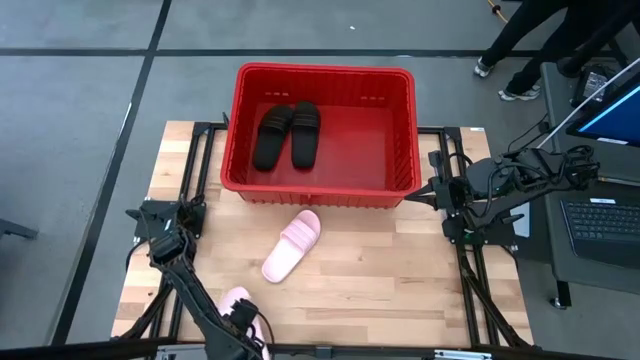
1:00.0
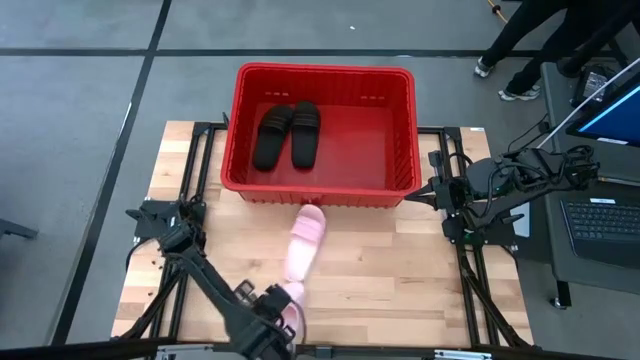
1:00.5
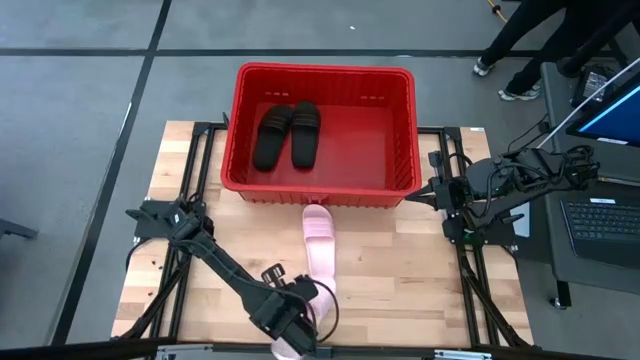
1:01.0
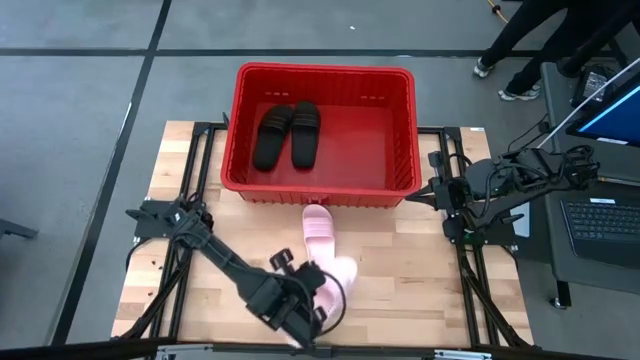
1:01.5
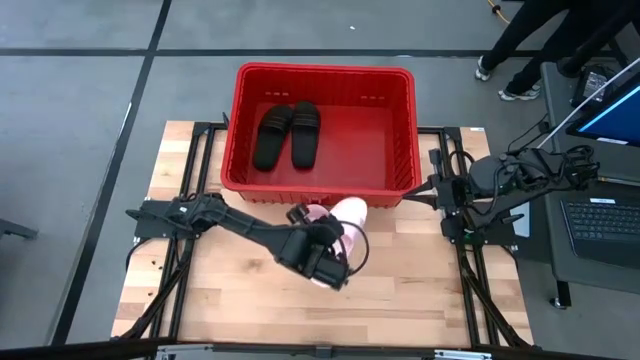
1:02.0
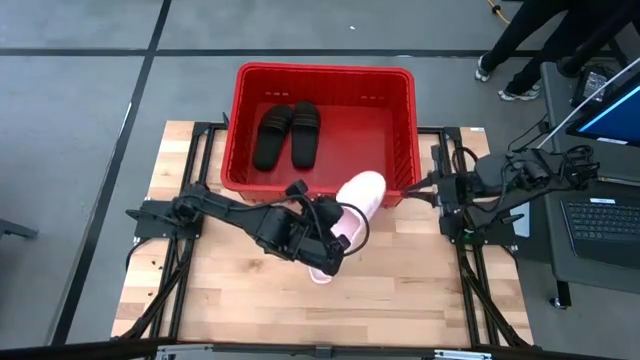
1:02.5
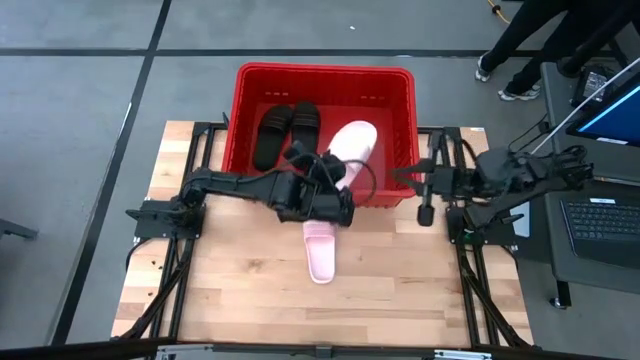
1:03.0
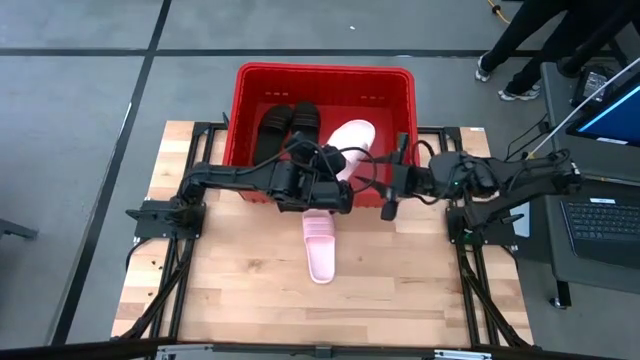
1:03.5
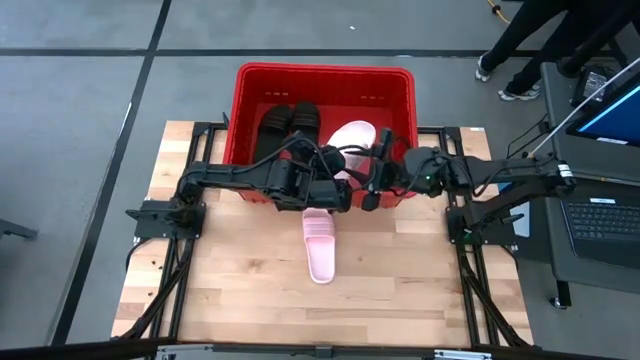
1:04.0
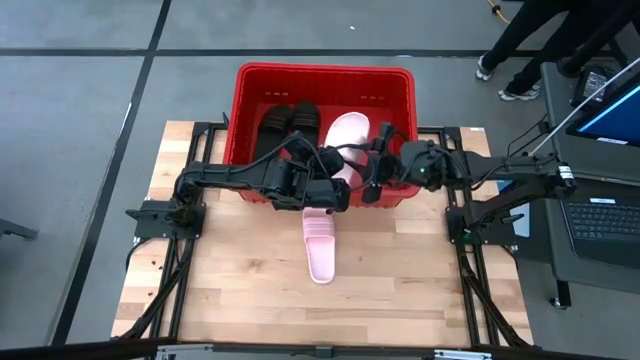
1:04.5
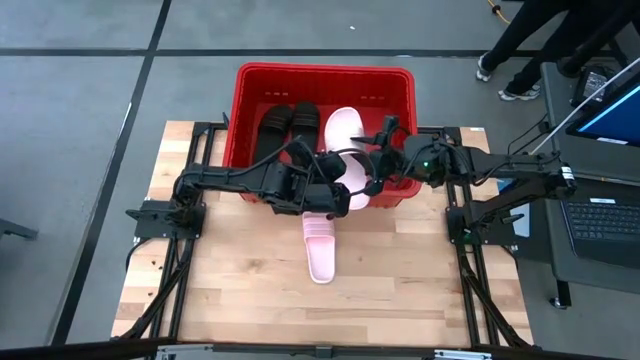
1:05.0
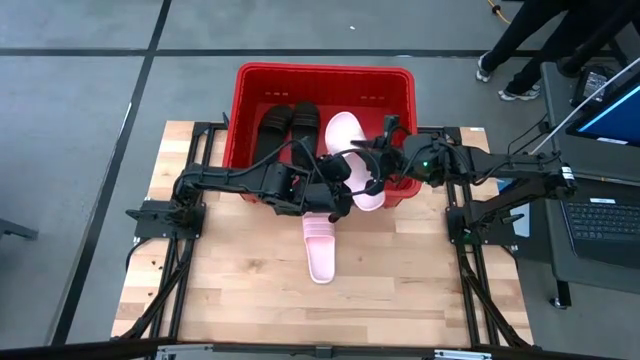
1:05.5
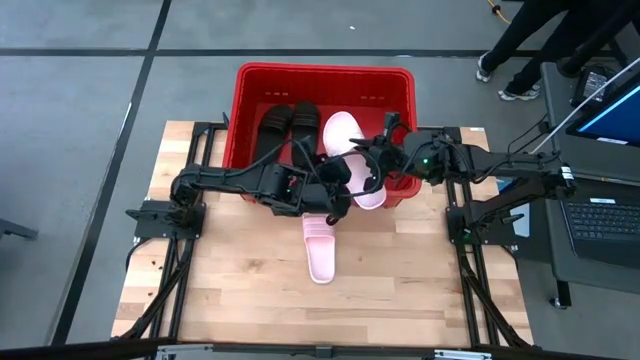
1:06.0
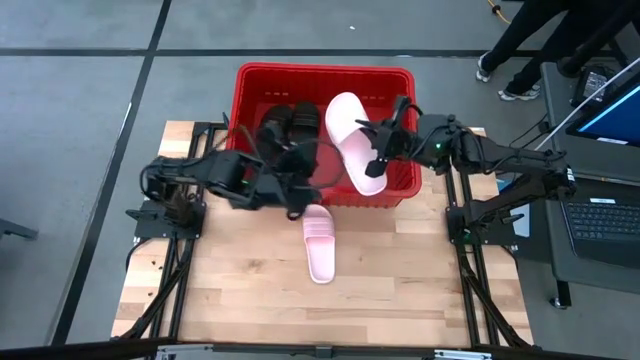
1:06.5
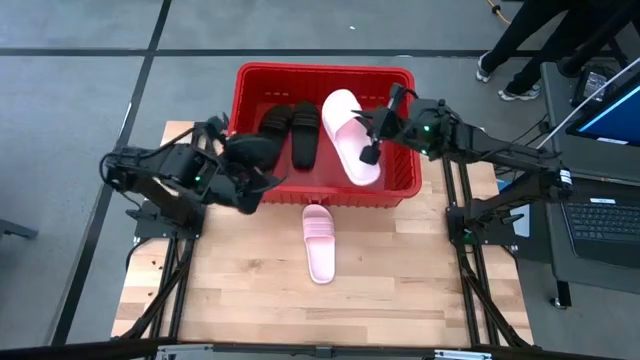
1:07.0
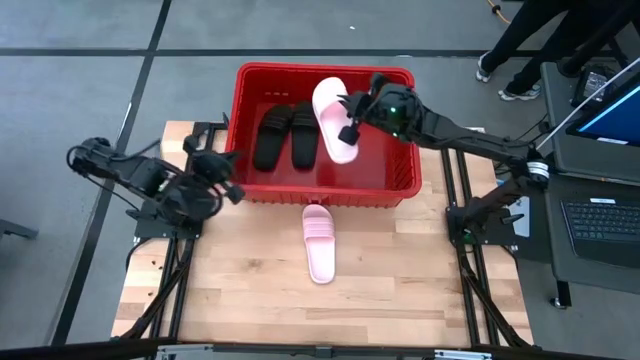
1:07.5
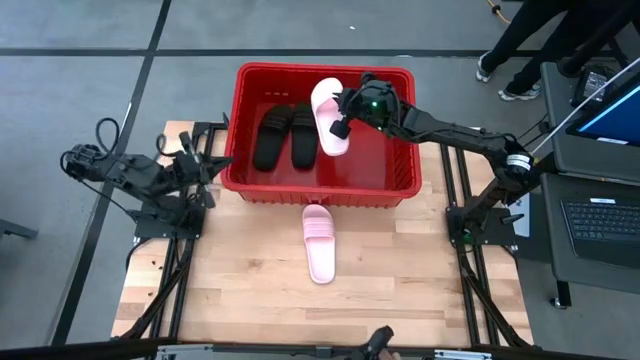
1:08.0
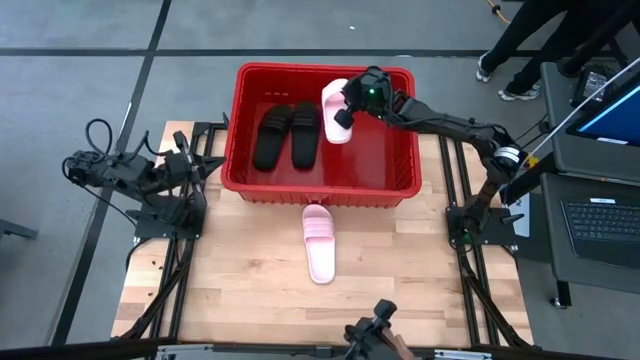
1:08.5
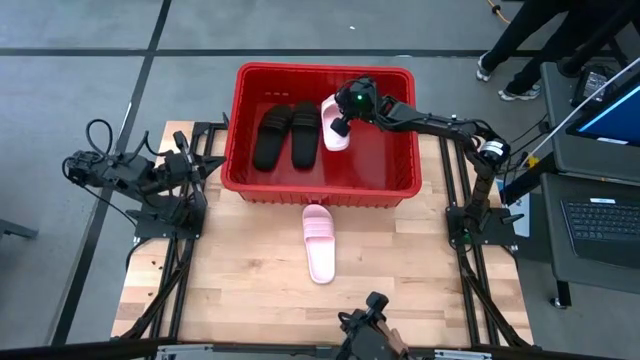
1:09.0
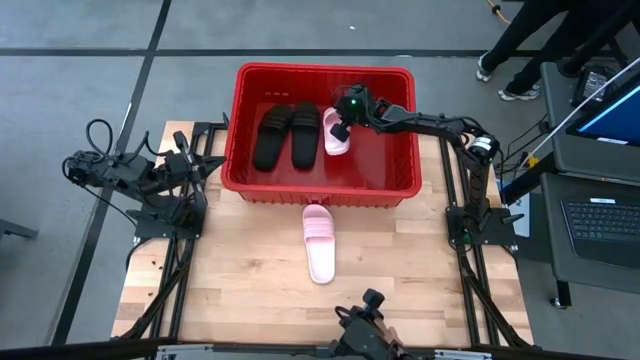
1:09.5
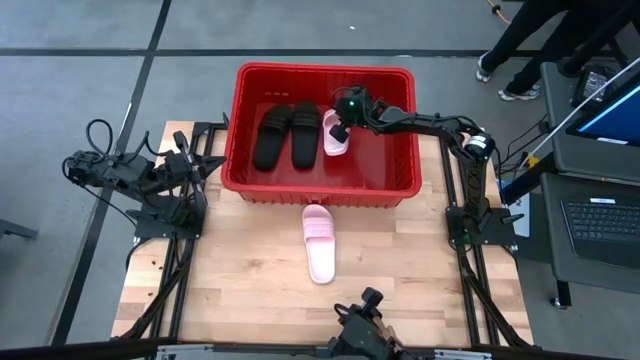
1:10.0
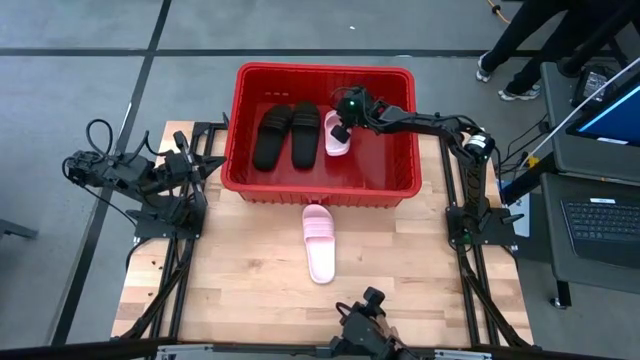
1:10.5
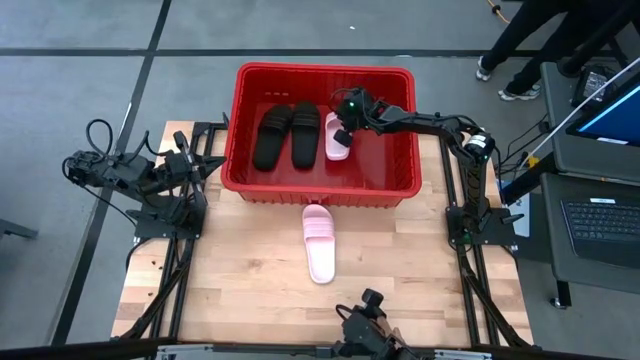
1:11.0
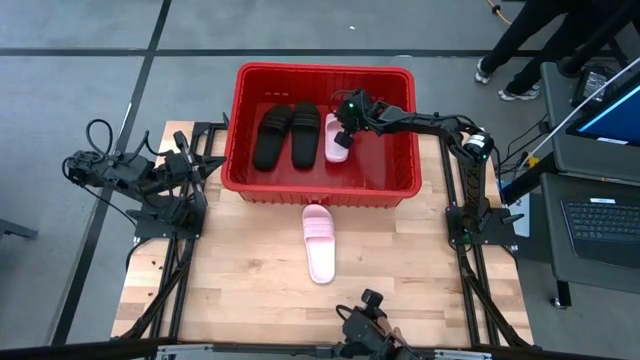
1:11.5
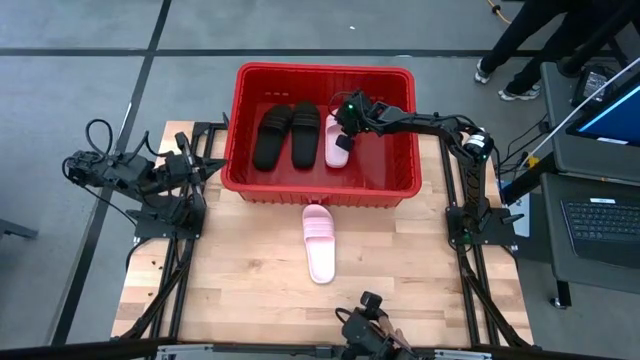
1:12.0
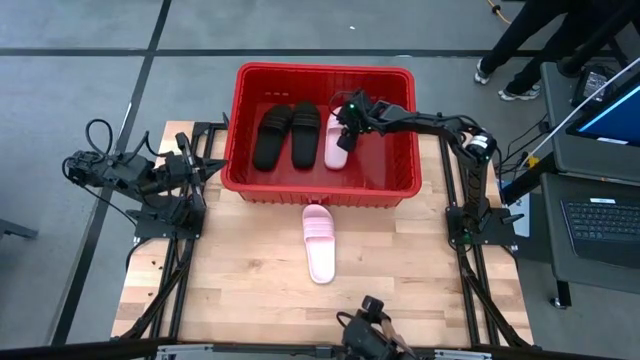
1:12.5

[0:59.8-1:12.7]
Task: Pick and place slides into bin
Put the left pink slipper into the red bin

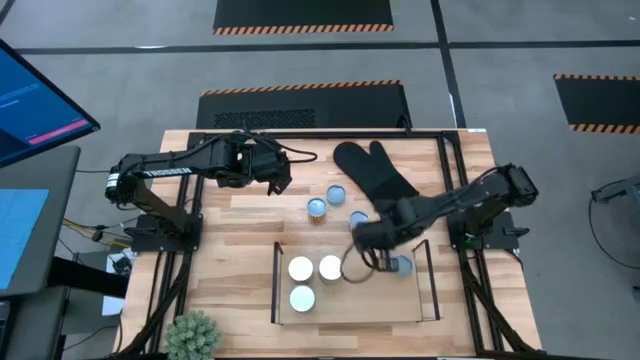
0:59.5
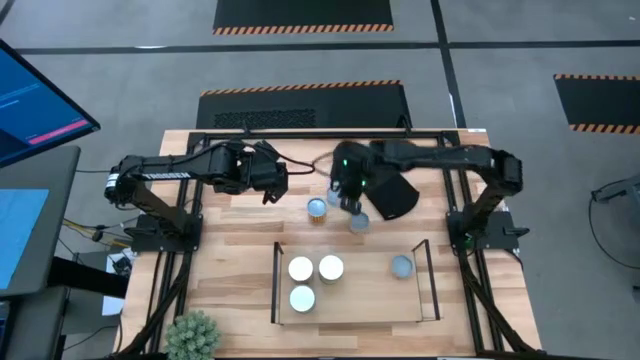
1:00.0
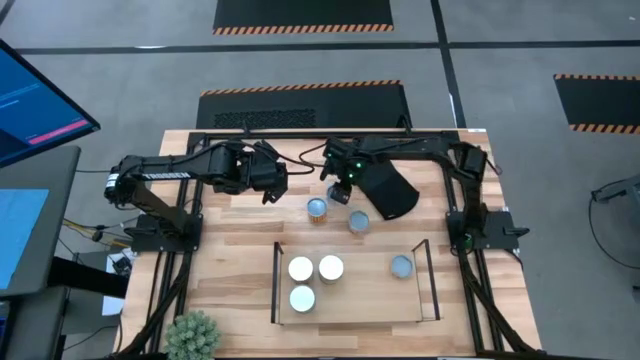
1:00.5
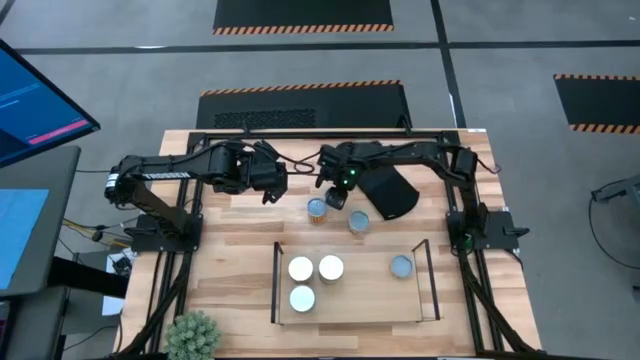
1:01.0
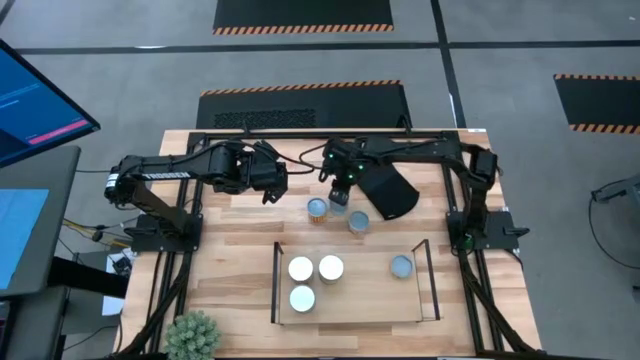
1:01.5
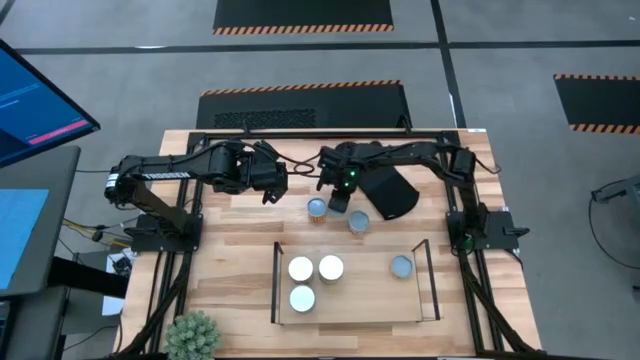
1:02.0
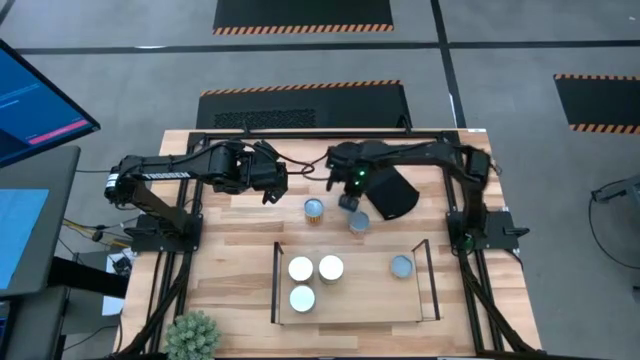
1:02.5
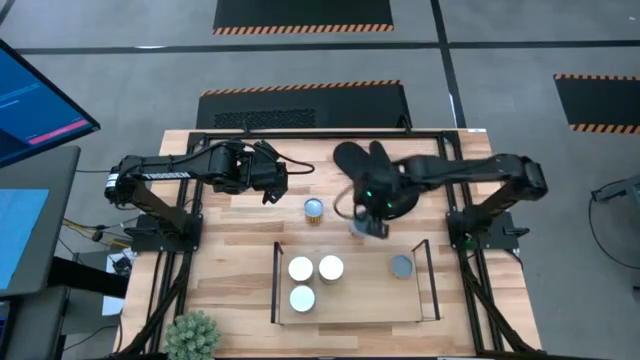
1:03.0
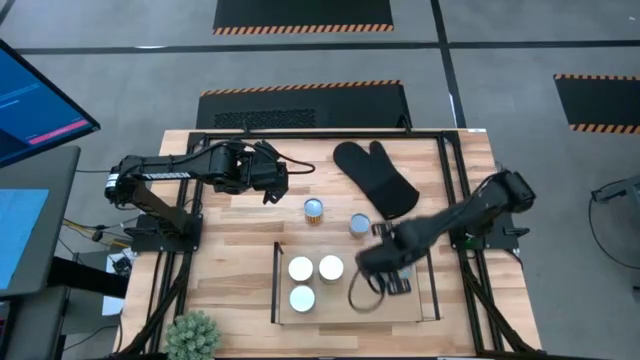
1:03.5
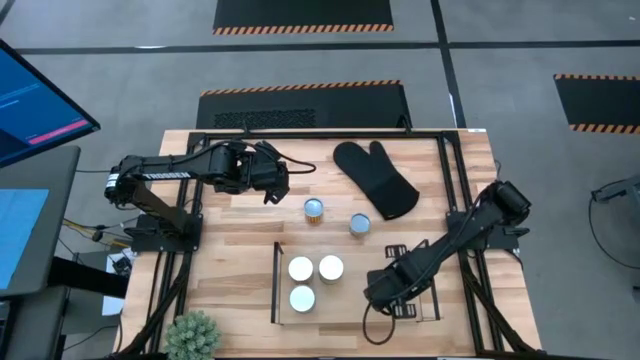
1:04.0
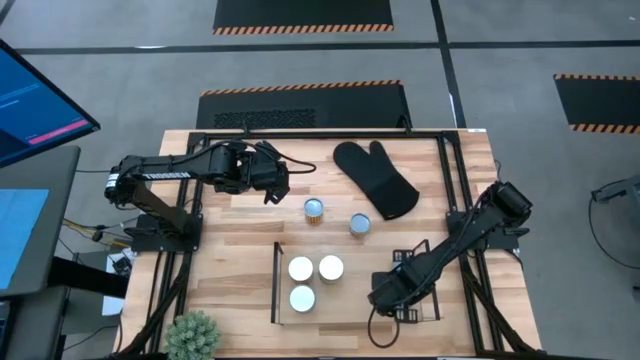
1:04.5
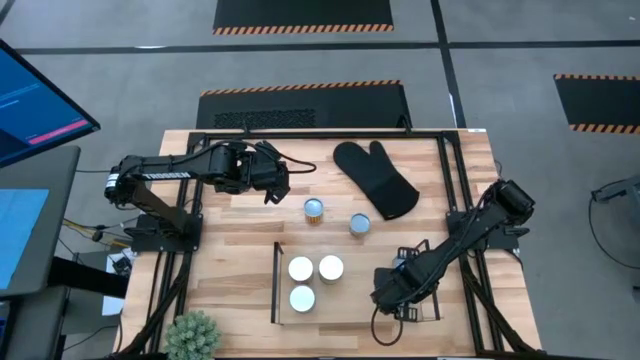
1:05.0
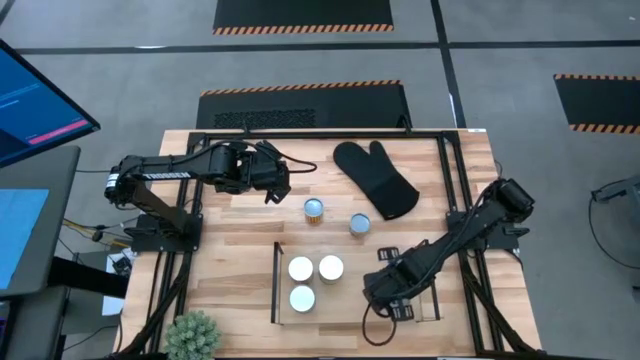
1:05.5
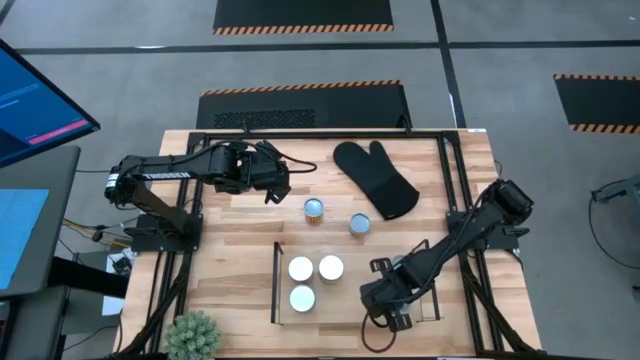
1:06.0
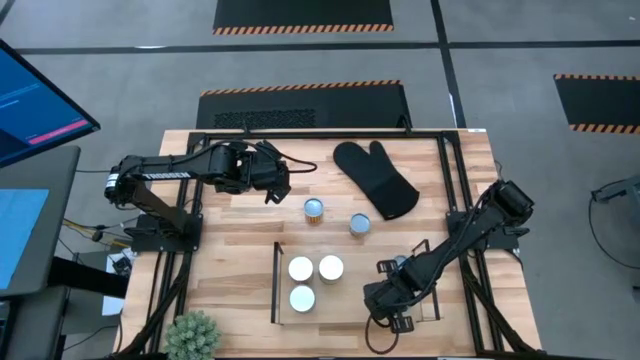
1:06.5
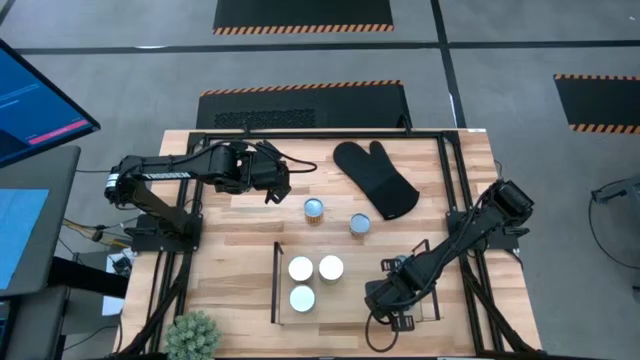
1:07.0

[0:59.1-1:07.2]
Task: Pick and place cans onto a shelf
Put the canned tuna on the shelf
